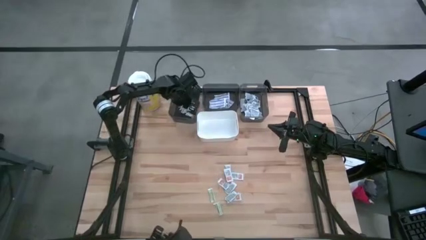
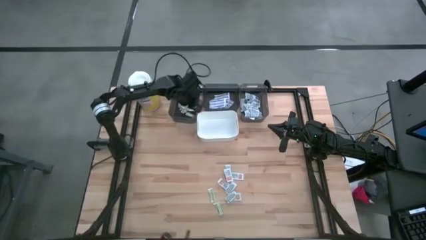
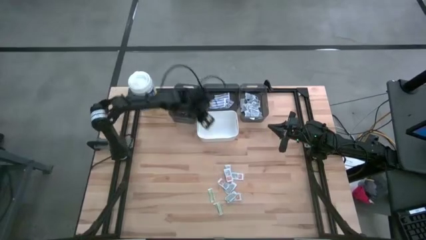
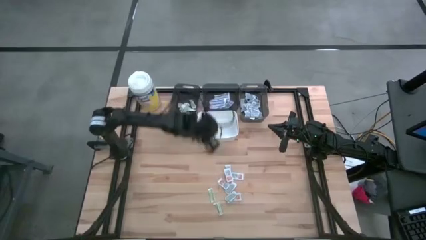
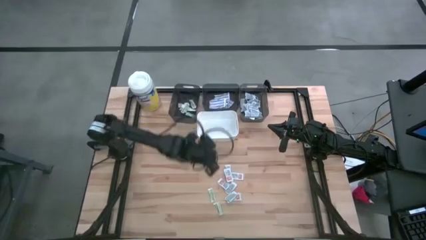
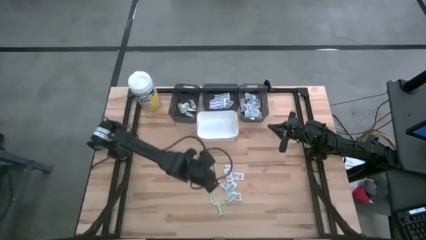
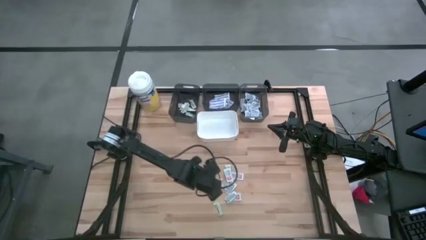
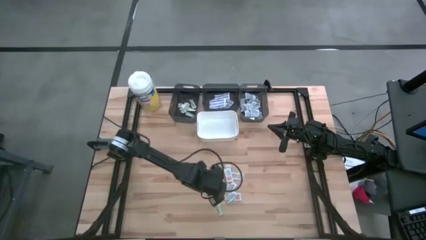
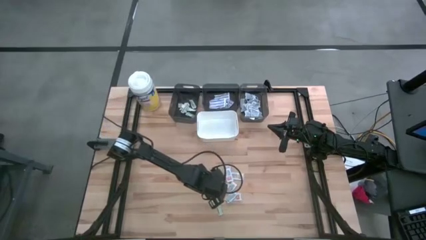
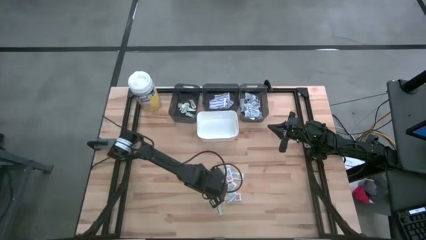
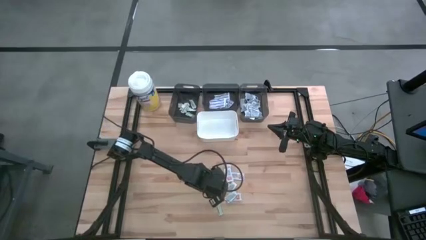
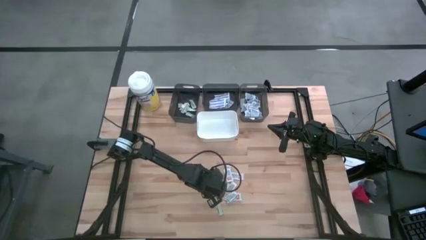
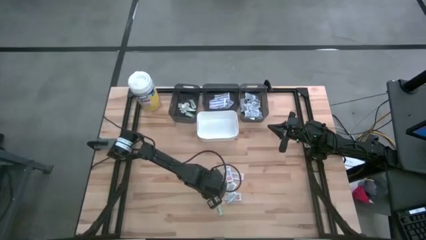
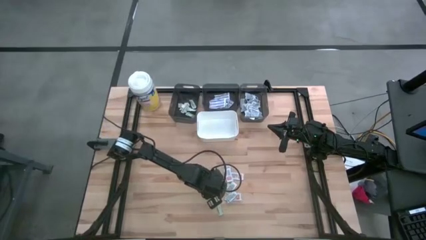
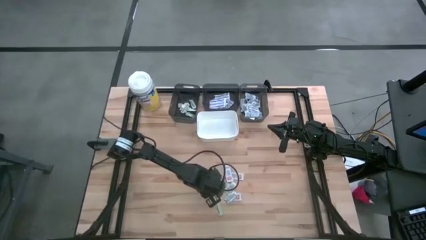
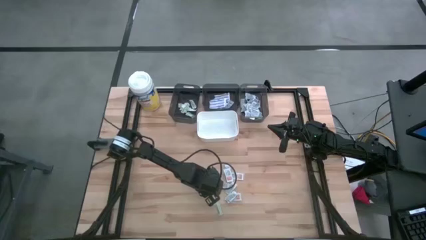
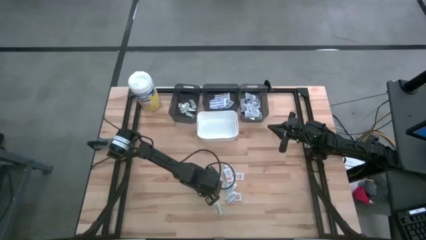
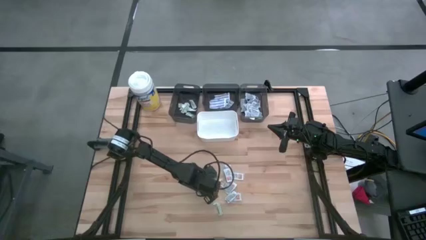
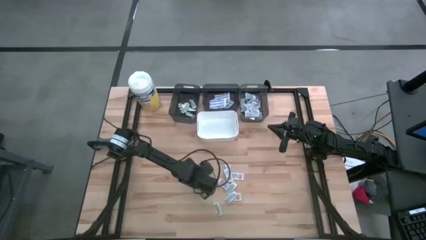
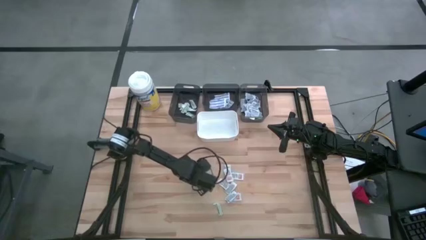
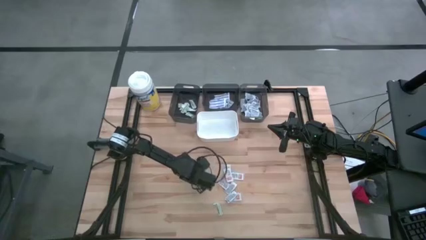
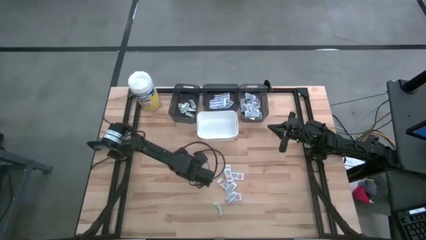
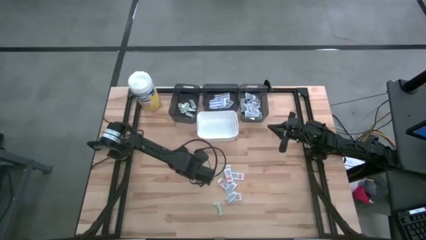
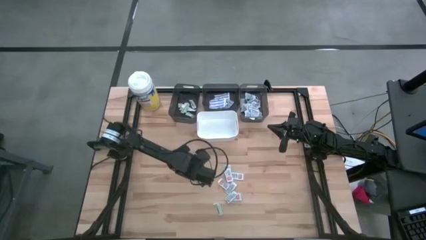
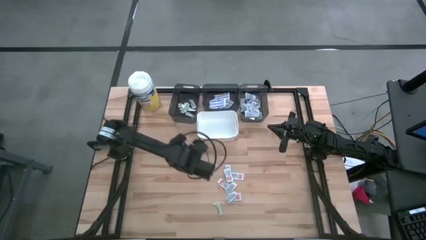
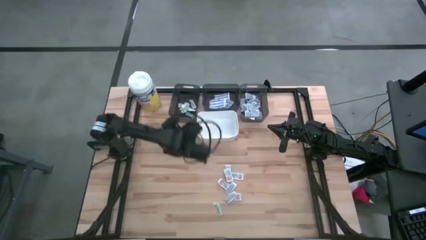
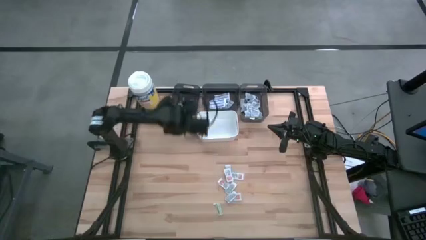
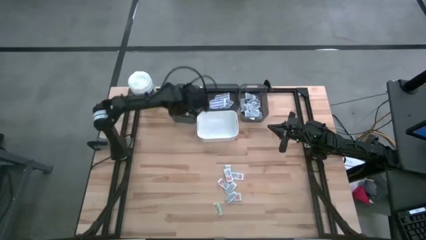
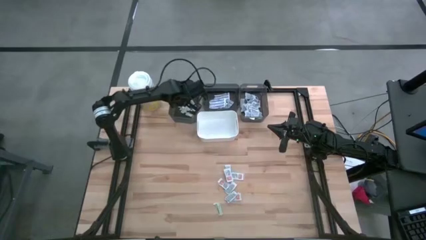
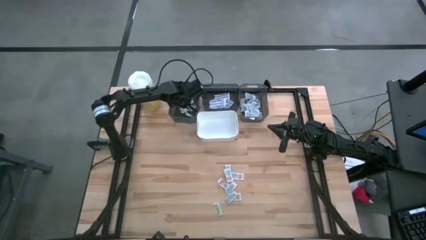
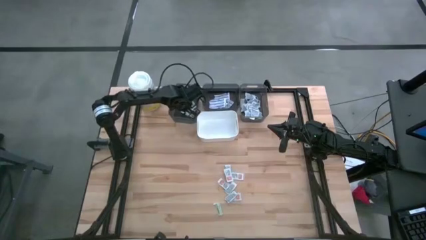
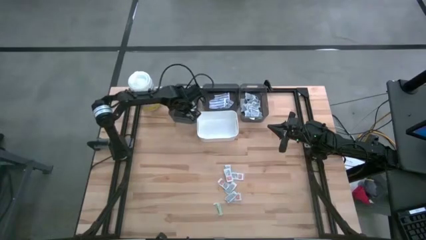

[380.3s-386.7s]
Task: Pick & Place First Aid Supplies
Put the green bandage pack into the left black bin

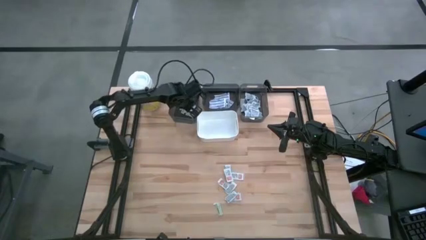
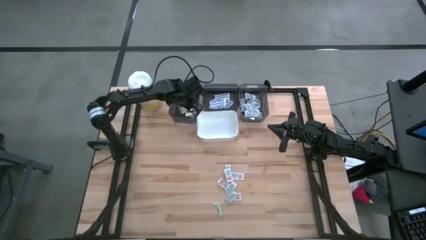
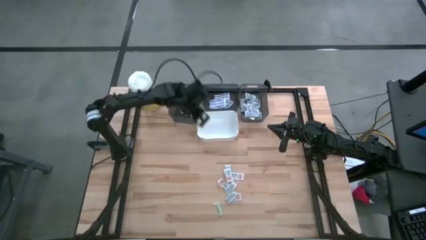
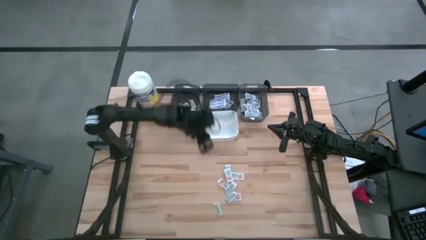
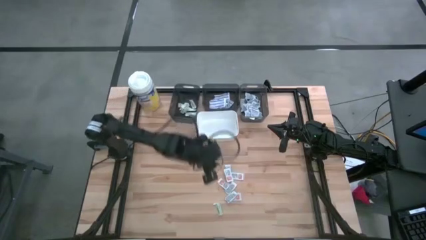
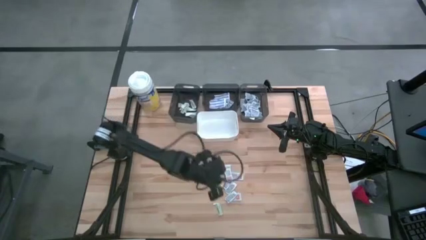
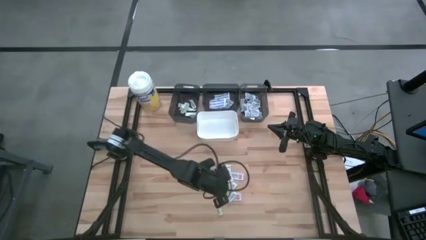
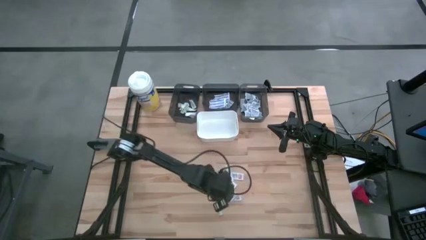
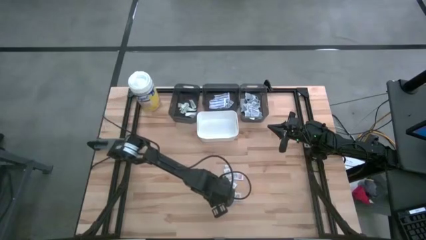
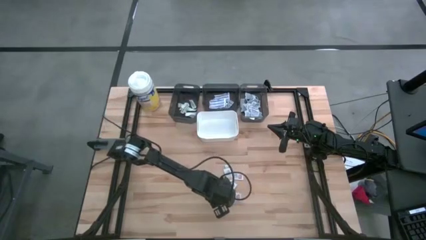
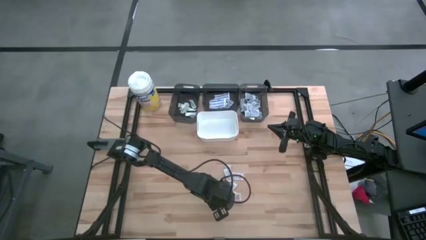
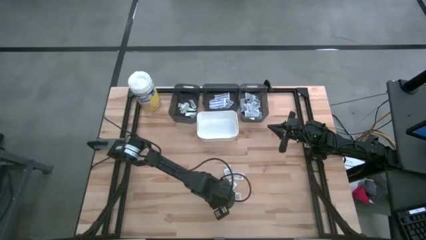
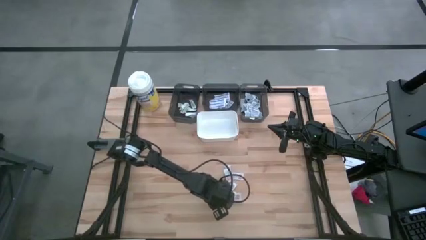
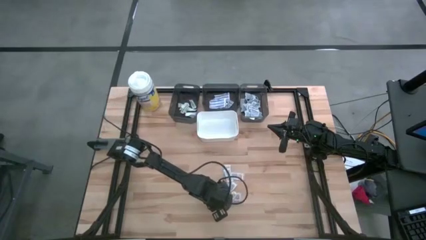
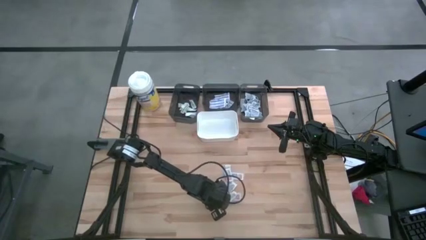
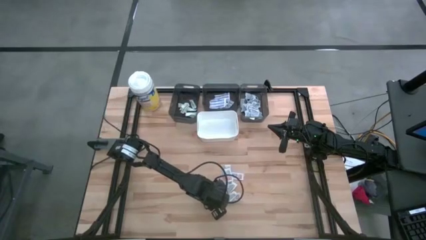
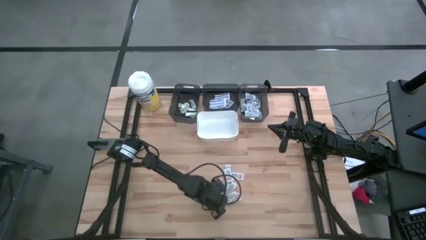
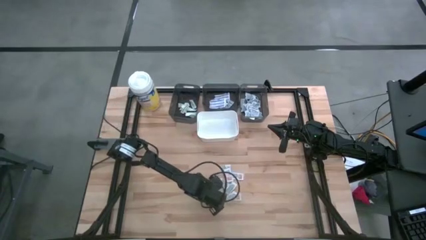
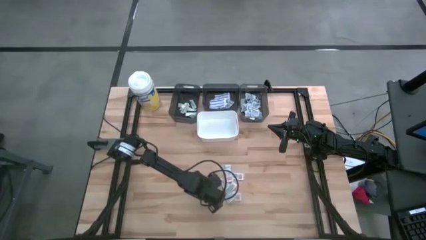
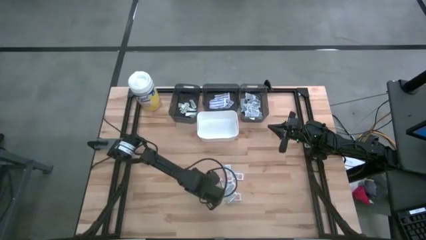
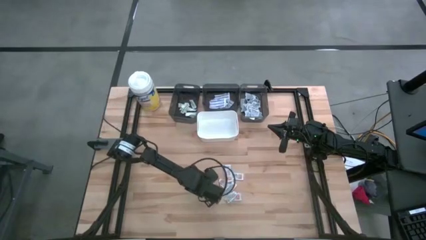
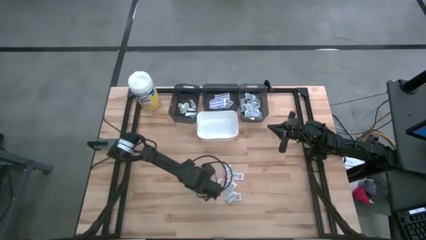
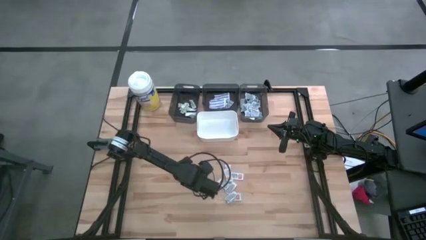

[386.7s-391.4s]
Put the green bandage pack into the left black bin

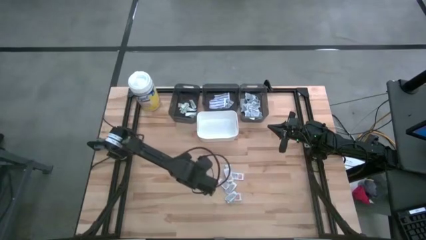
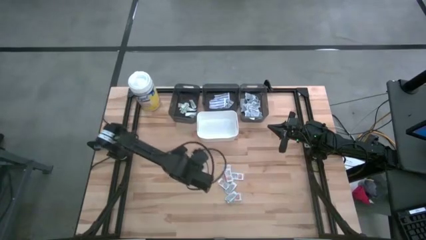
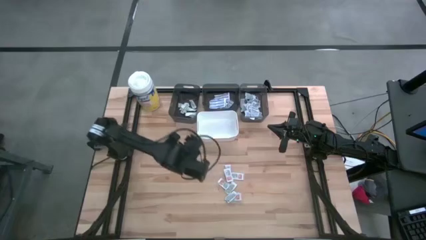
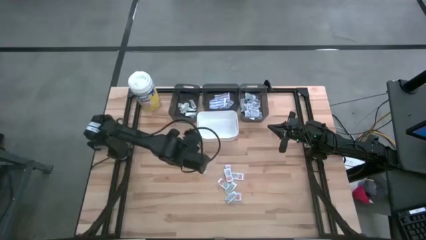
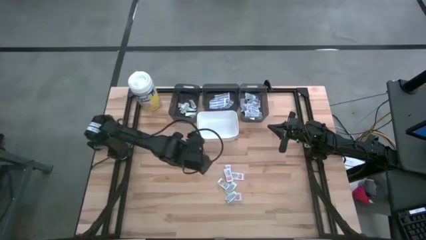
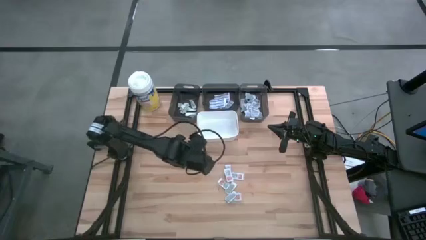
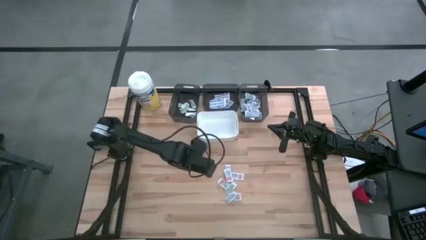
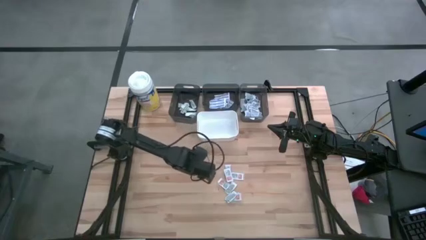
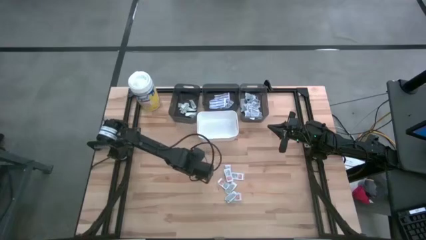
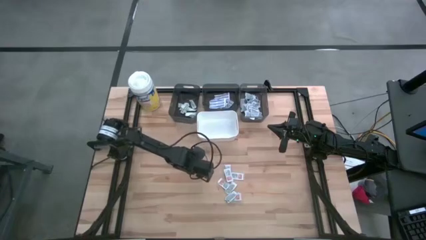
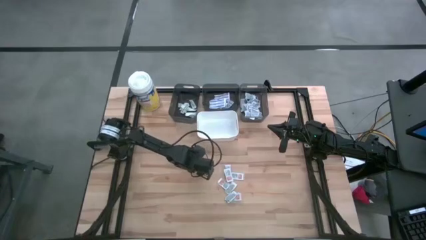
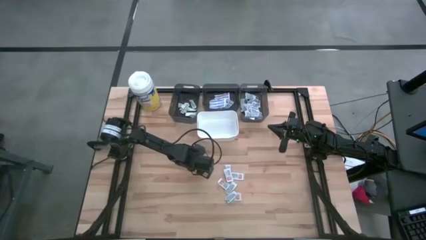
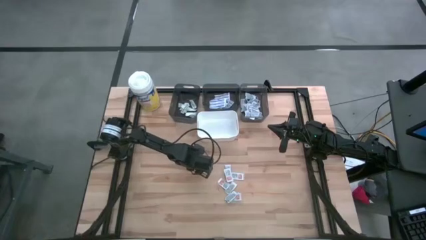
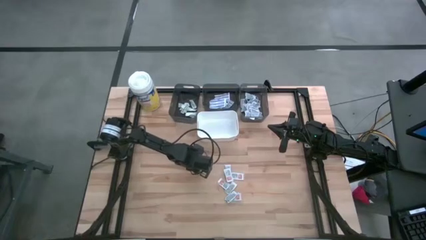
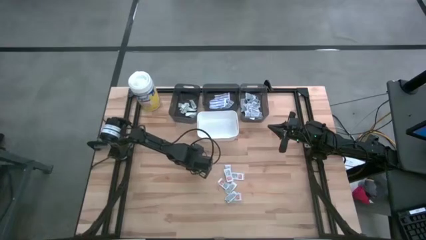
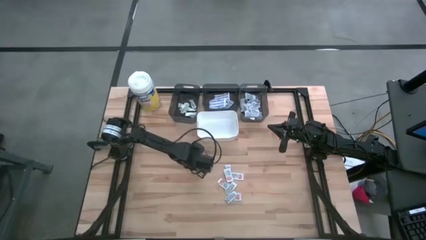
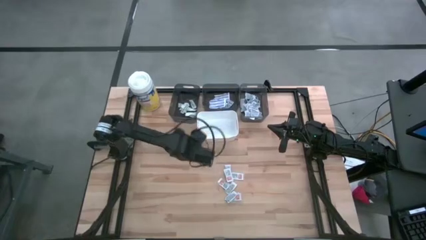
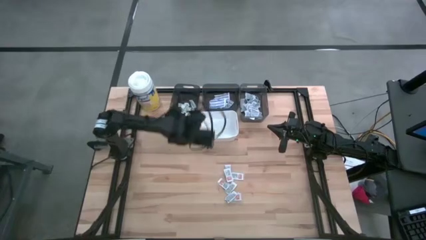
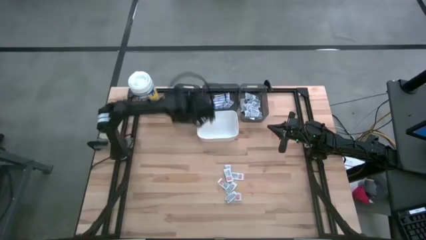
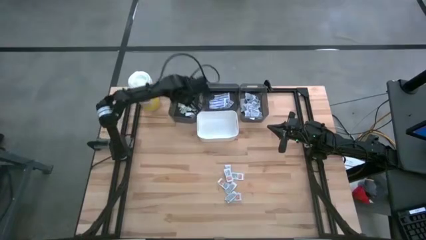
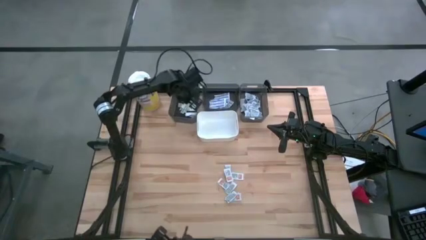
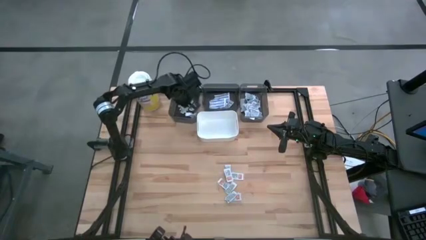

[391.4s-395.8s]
Put the green bandage pack into the left black bin

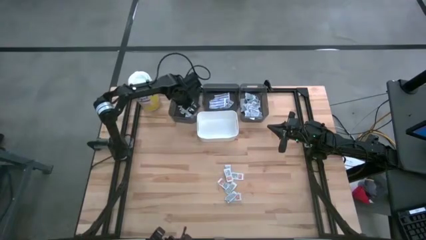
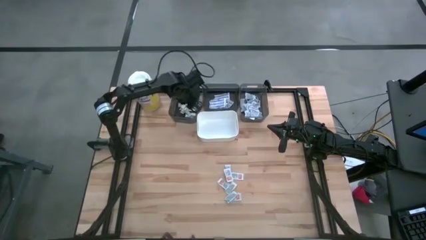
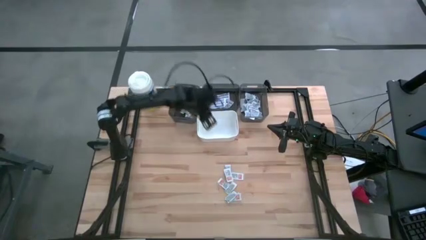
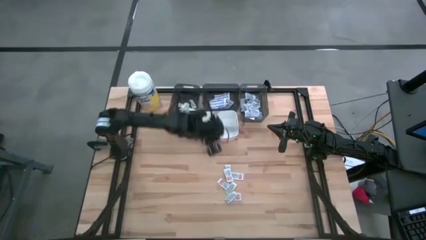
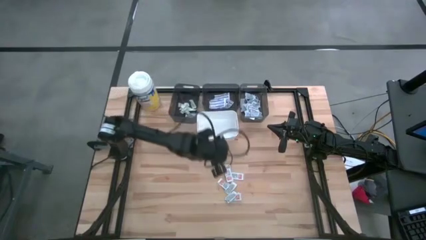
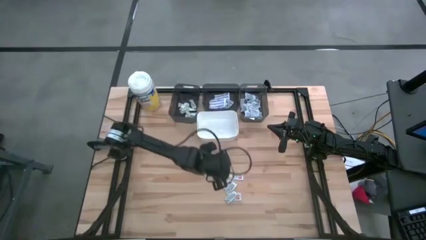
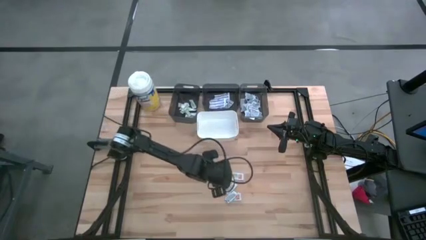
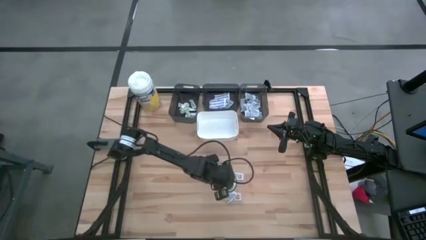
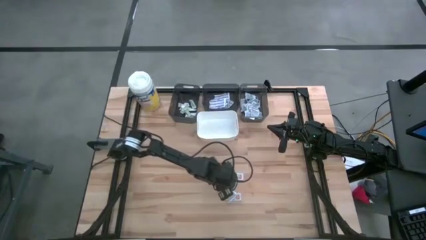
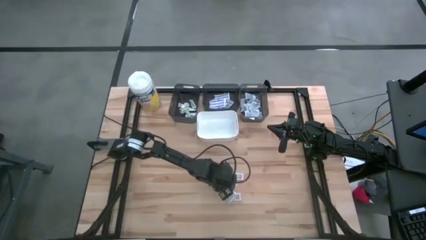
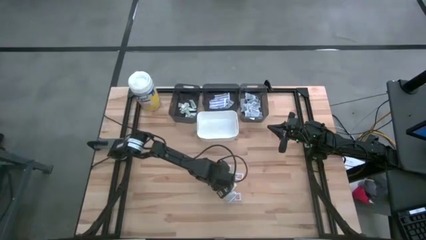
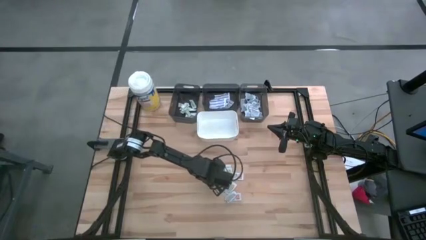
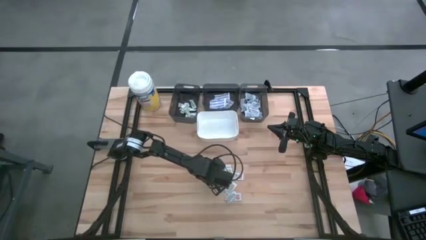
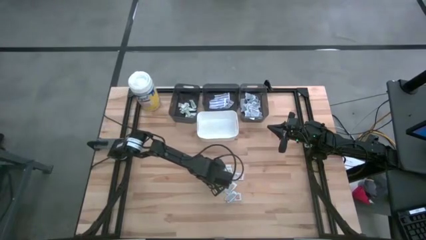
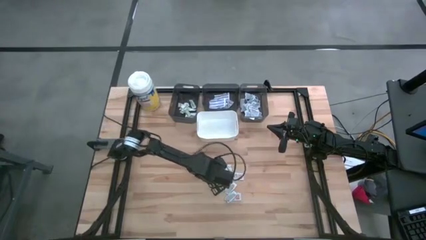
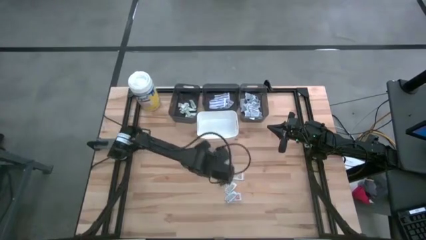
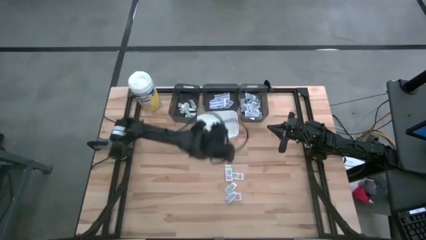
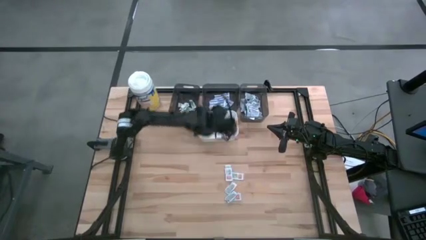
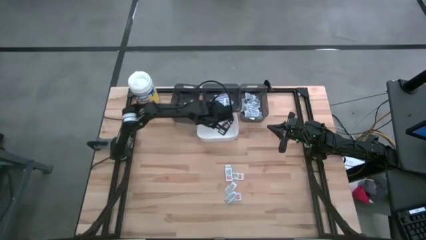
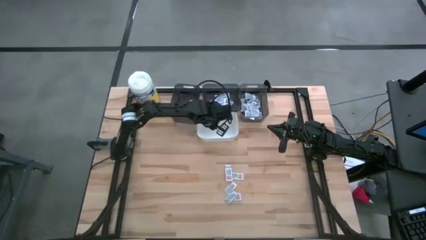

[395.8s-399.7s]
Put the orange ointment pack into the white bin
